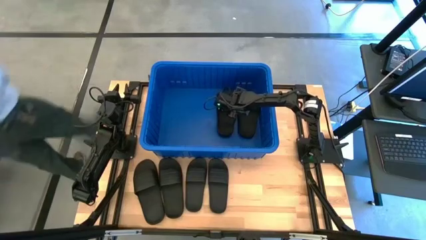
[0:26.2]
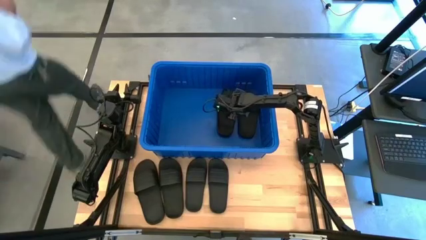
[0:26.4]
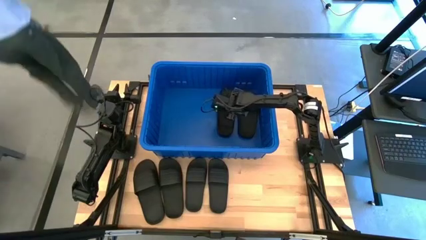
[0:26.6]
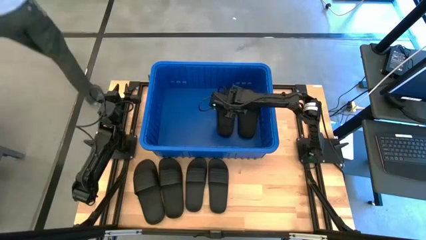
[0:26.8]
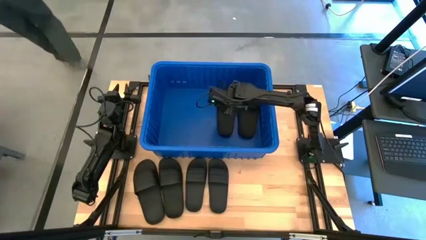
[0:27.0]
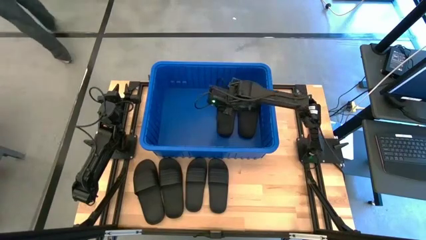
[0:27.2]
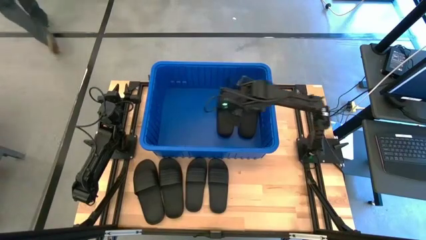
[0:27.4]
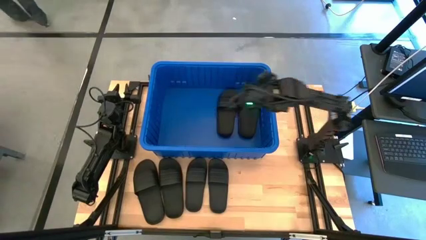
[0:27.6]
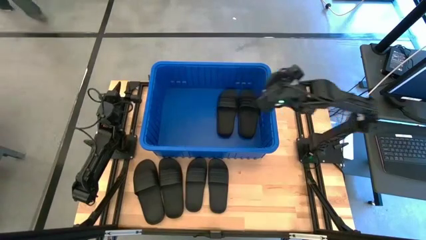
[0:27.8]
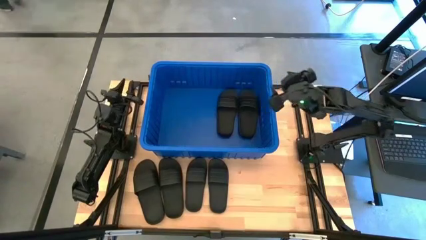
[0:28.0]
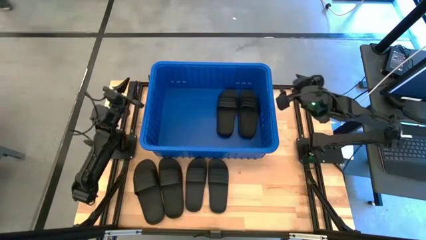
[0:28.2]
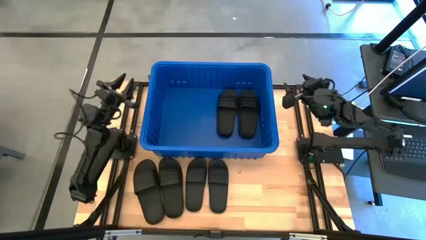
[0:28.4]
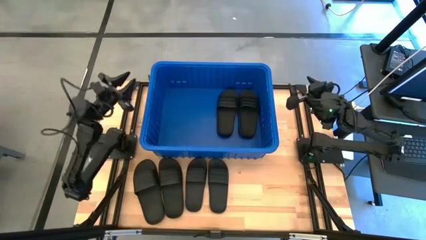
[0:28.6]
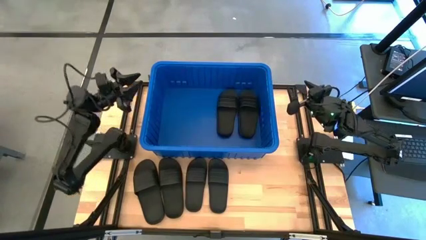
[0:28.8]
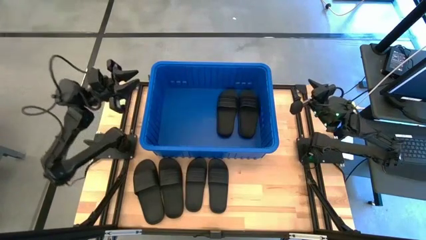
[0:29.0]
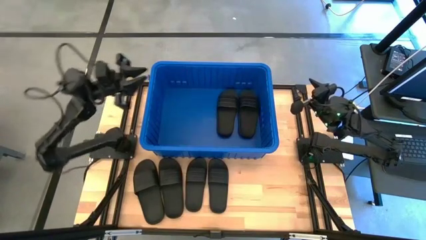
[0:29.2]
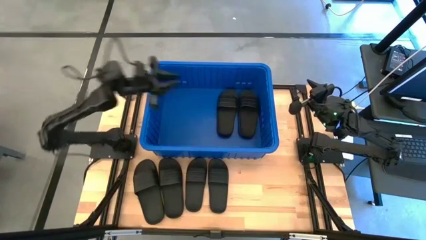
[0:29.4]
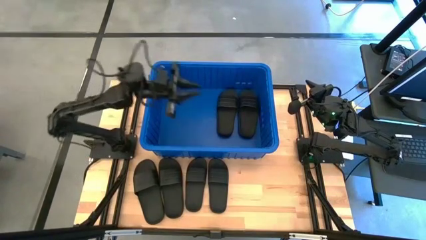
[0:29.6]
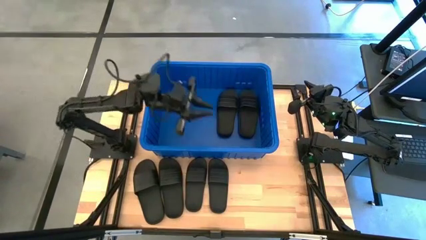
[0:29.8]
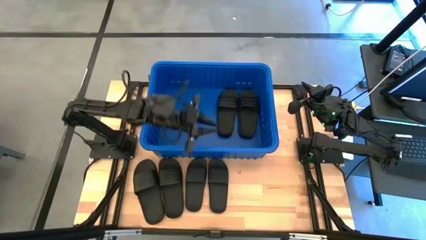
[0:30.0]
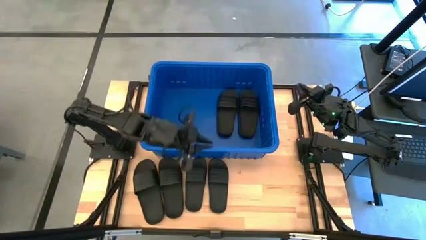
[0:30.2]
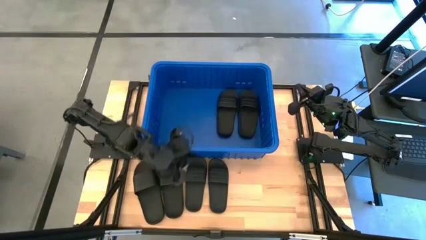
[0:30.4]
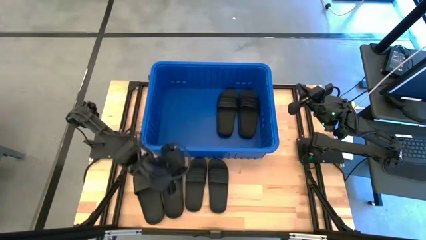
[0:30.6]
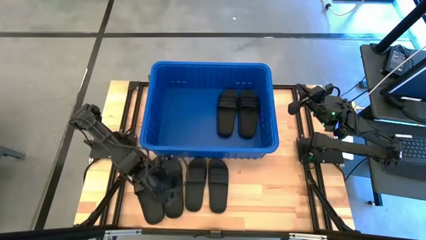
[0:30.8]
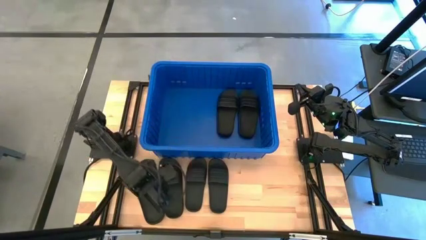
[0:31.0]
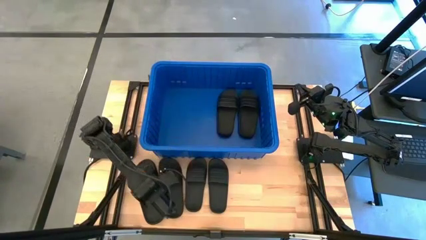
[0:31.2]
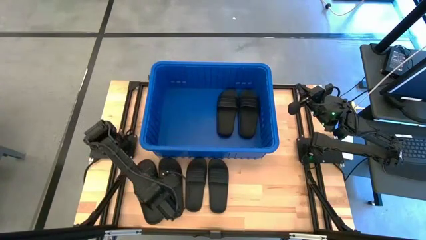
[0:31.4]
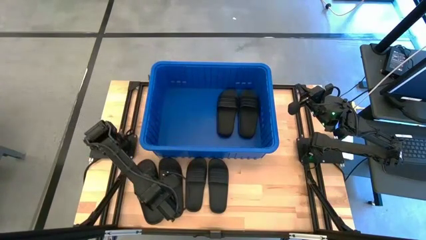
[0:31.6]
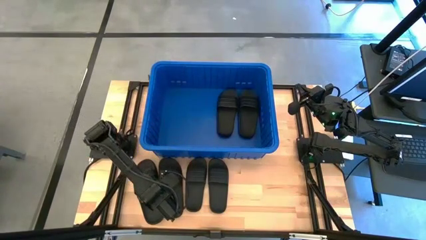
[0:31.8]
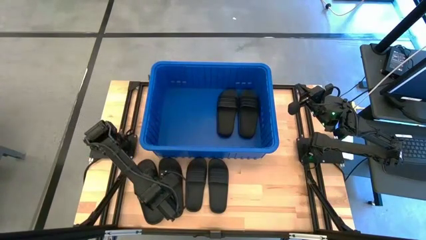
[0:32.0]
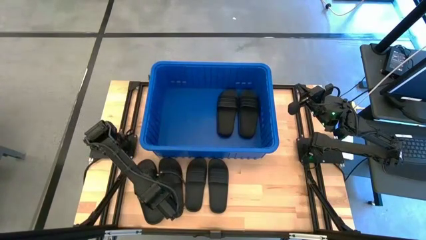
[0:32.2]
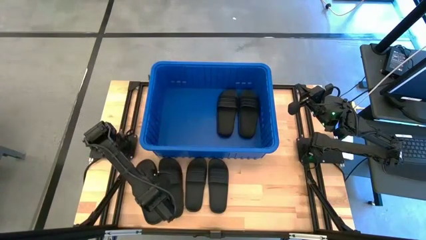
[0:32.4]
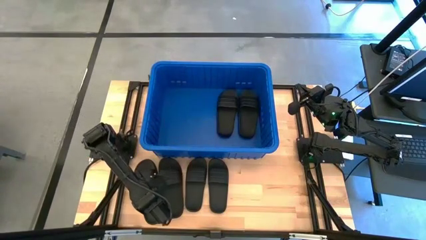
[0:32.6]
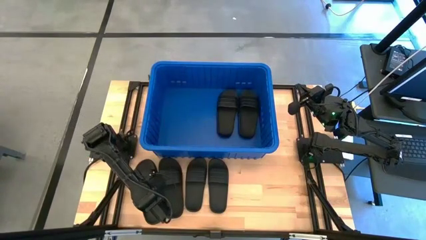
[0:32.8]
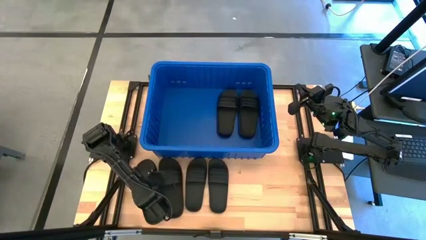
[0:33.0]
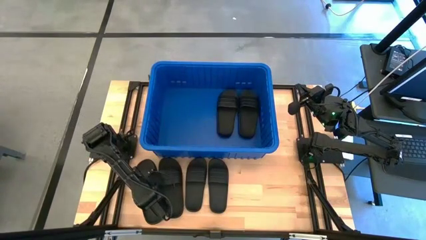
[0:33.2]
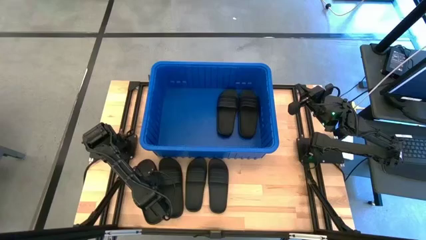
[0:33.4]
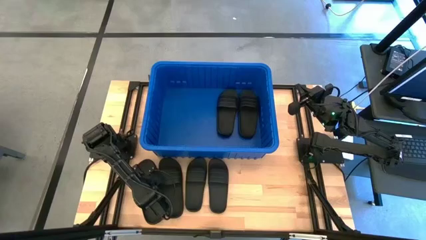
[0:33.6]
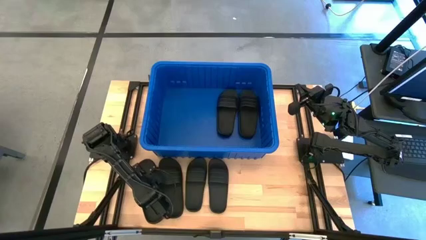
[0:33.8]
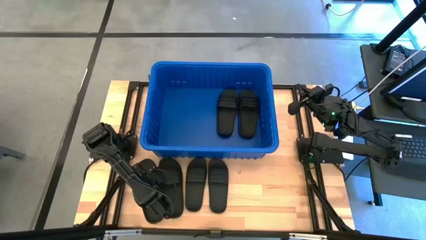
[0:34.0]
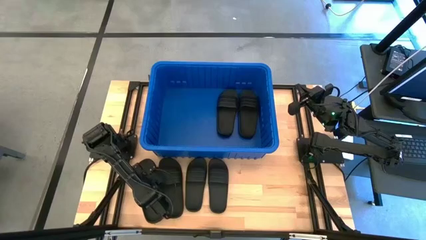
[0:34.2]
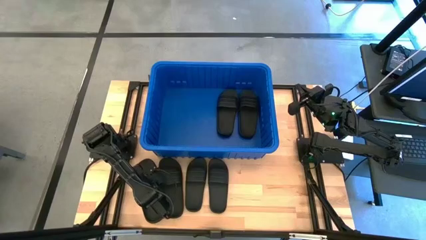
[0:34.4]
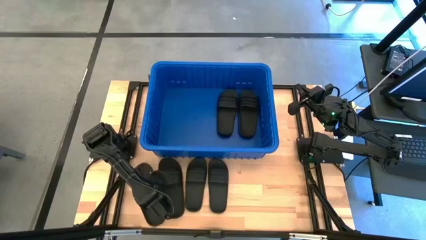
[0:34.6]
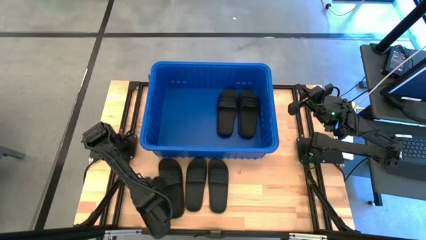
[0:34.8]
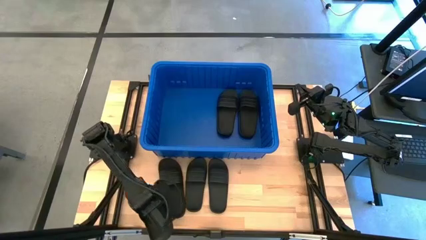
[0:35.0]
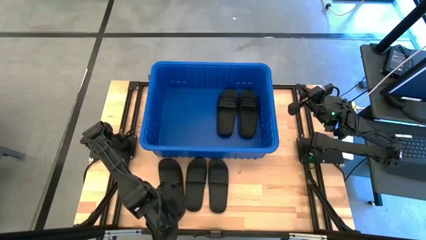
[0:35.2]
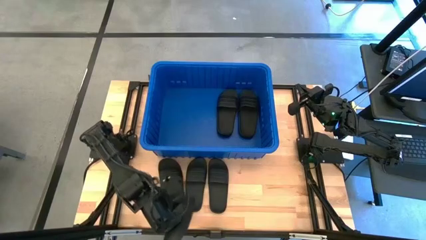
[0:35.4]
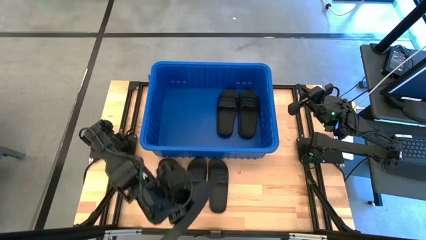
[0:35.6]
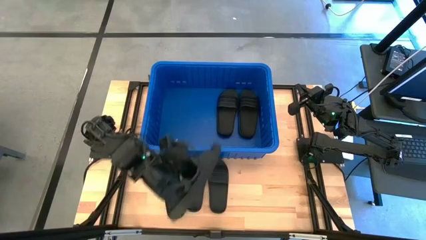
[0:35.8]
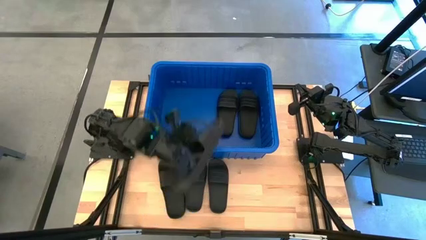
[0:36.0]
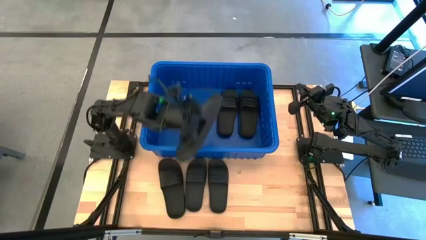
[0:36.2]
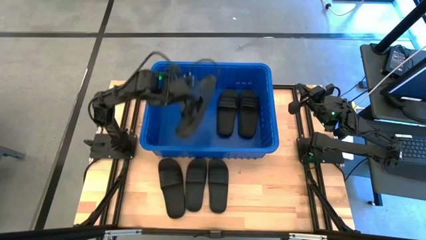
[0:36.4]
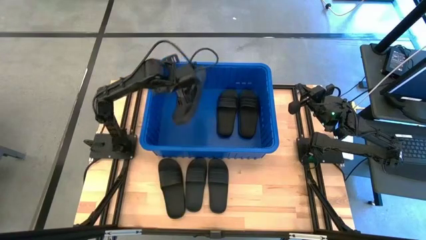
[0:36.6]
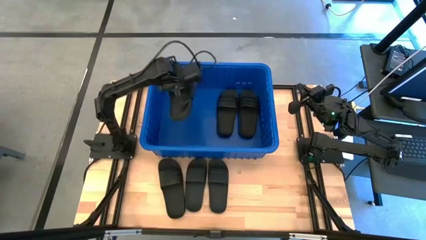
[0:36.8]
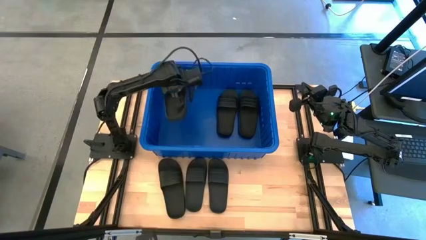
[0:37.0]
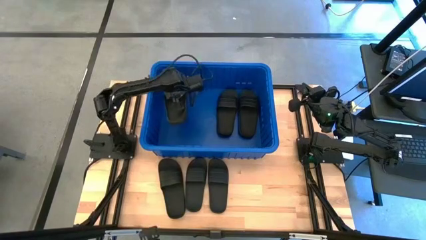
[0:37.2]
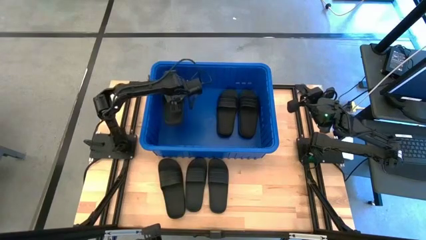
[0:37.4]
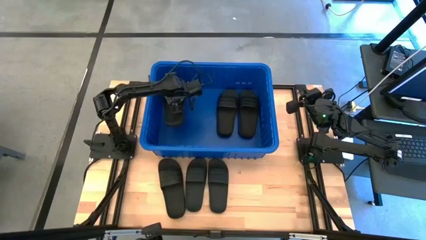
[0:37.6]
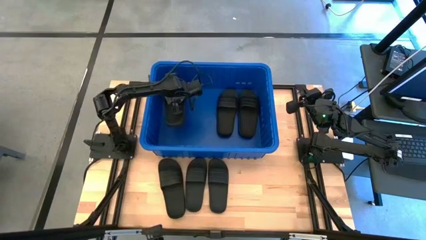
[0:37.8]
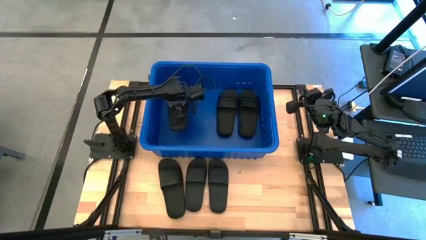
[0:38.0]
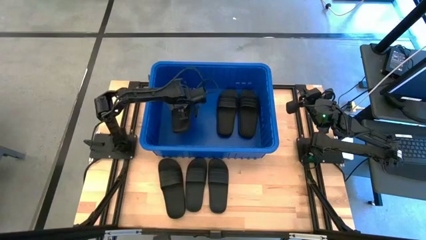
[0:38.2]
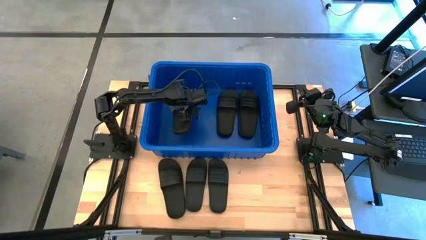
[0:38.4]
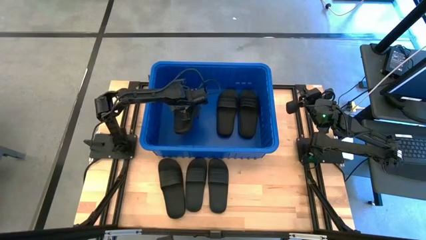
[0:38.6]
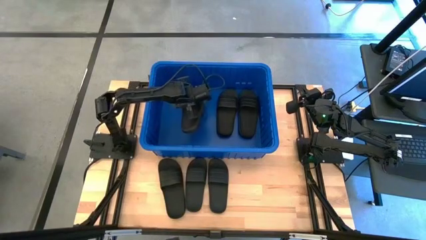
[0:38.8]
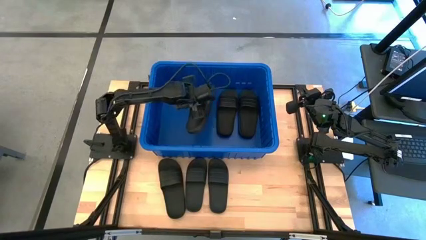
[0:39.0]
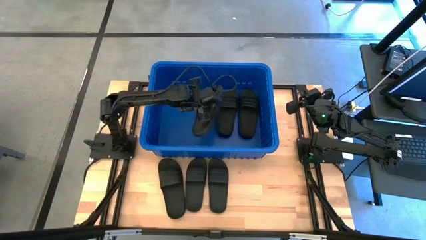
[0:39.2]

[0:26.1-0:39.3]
Task: Pick and place slides into bin
Put the black slides into the blue organizer bin
